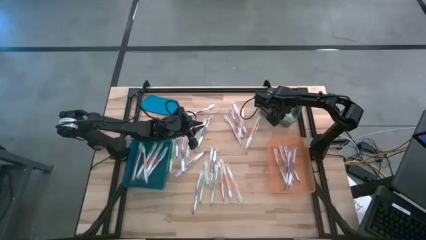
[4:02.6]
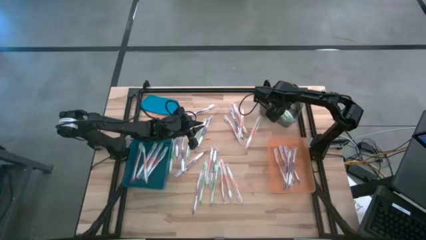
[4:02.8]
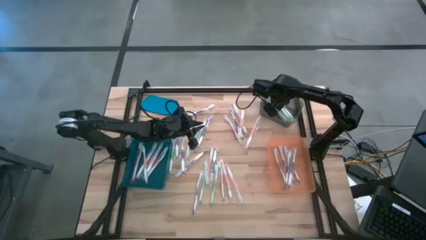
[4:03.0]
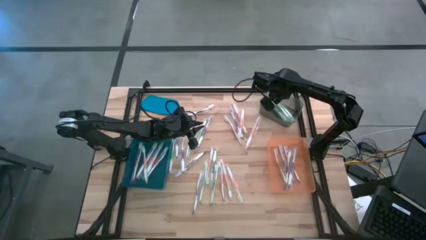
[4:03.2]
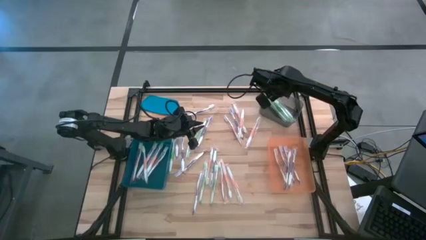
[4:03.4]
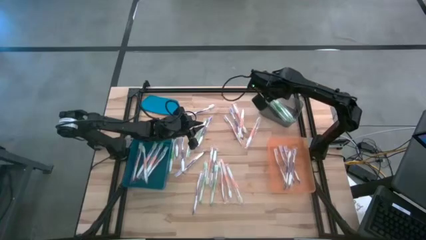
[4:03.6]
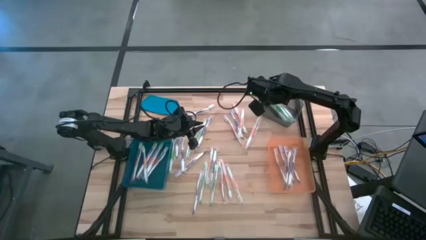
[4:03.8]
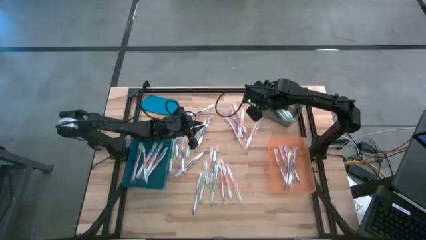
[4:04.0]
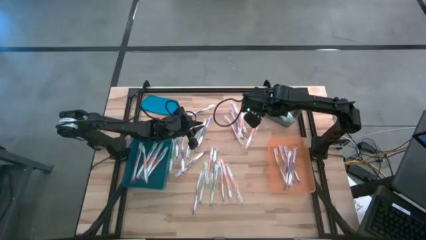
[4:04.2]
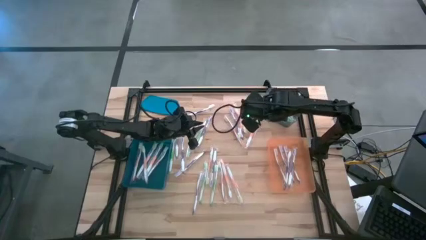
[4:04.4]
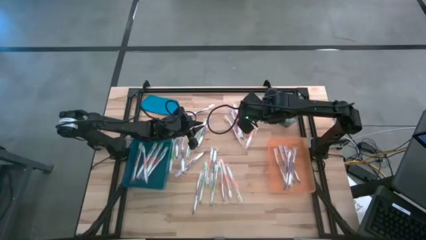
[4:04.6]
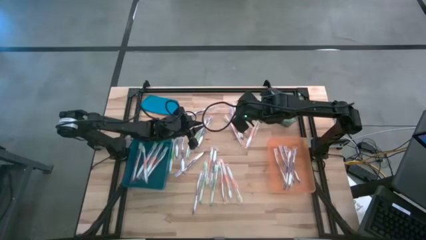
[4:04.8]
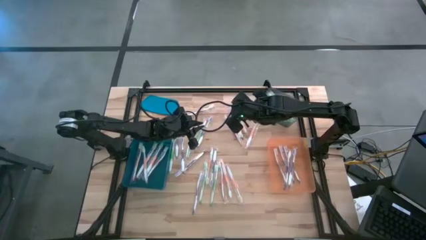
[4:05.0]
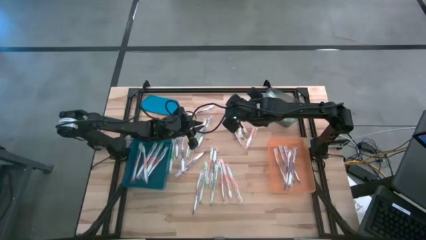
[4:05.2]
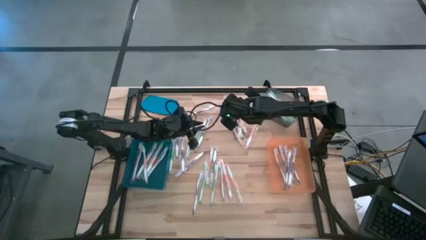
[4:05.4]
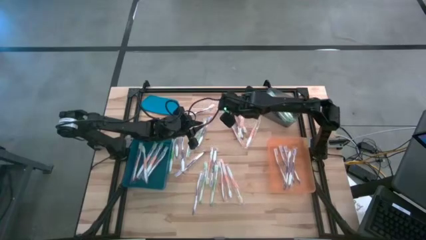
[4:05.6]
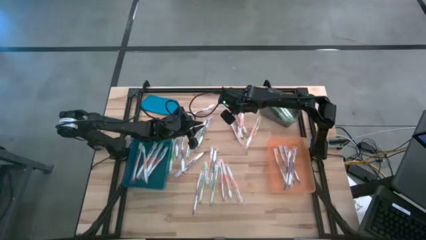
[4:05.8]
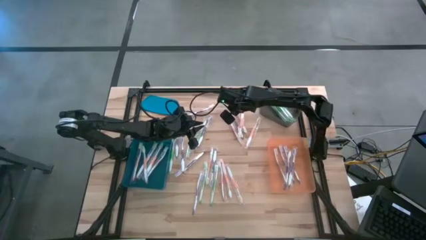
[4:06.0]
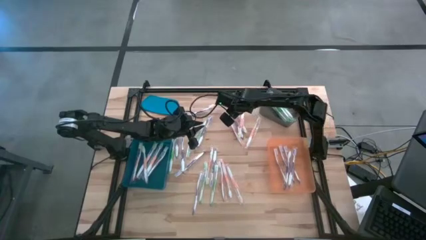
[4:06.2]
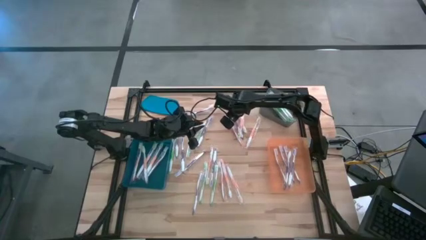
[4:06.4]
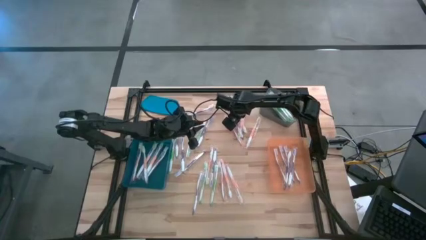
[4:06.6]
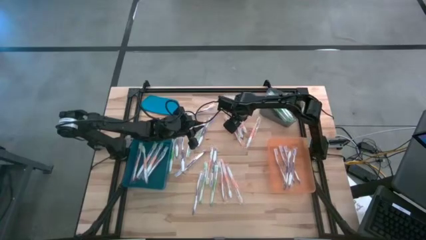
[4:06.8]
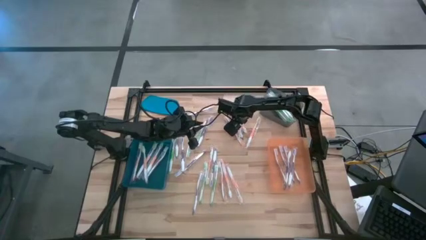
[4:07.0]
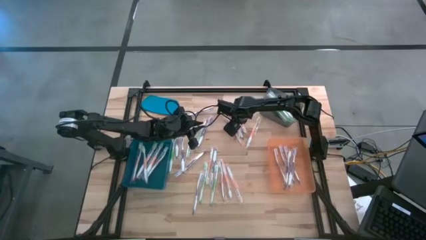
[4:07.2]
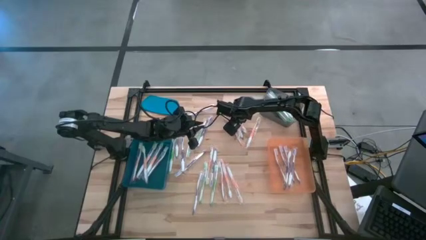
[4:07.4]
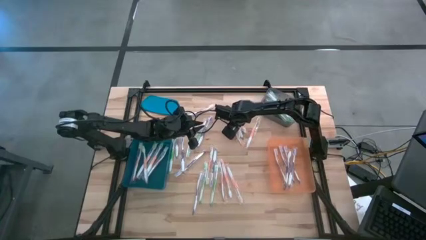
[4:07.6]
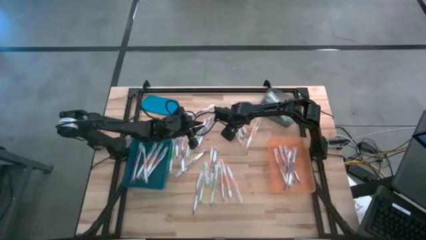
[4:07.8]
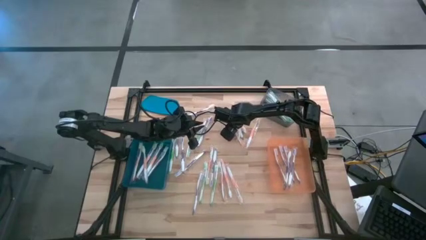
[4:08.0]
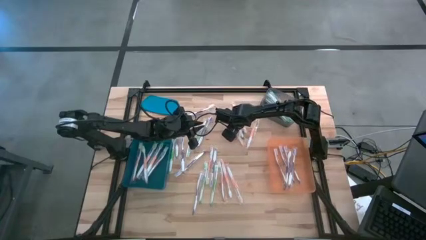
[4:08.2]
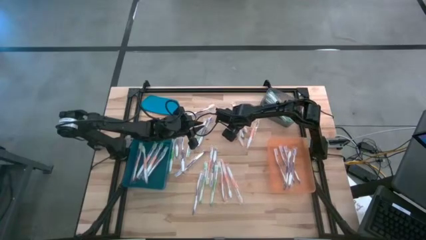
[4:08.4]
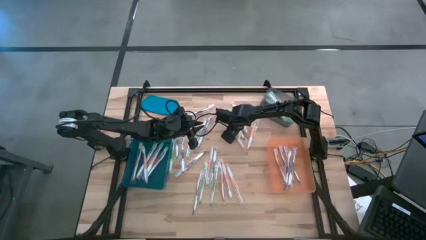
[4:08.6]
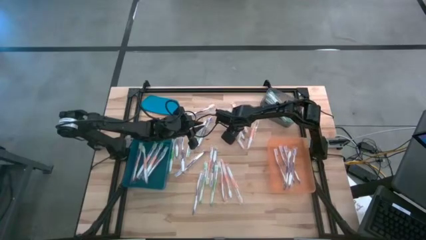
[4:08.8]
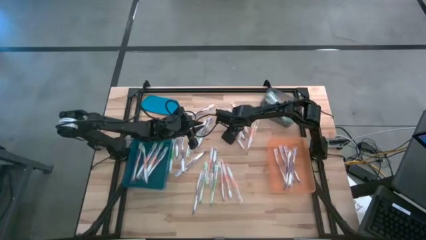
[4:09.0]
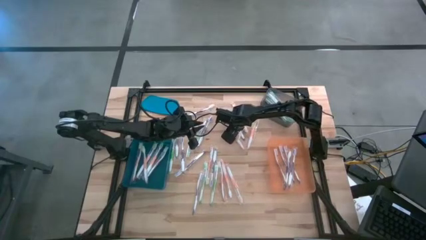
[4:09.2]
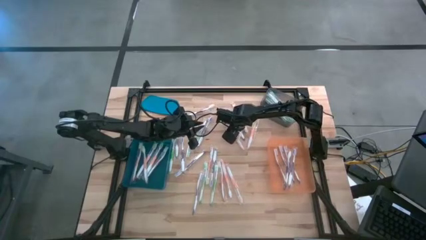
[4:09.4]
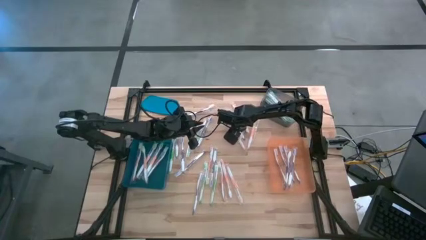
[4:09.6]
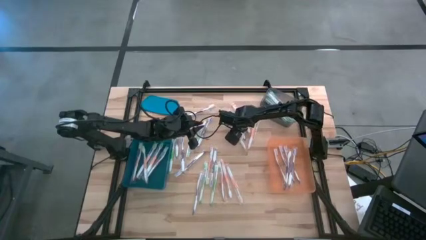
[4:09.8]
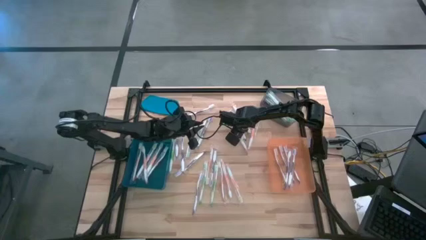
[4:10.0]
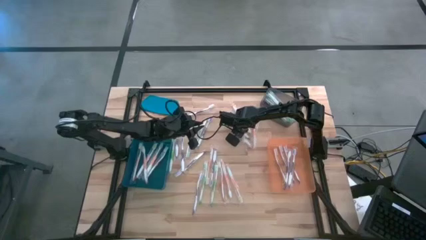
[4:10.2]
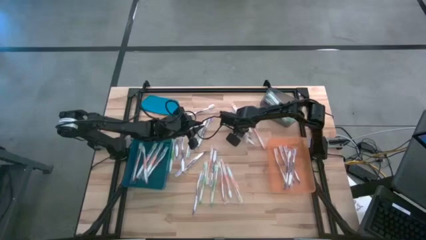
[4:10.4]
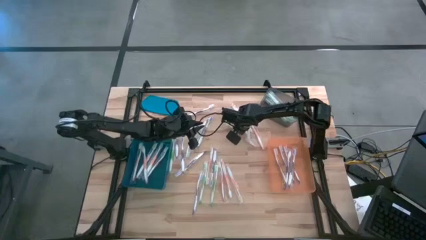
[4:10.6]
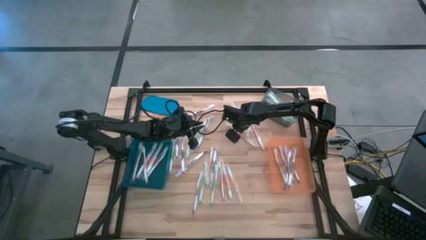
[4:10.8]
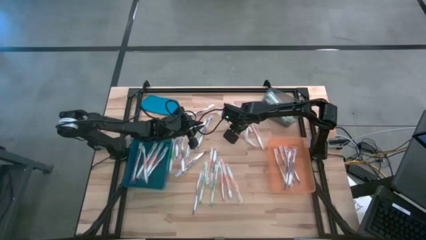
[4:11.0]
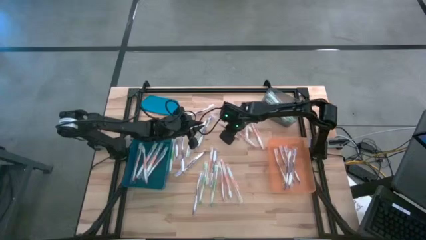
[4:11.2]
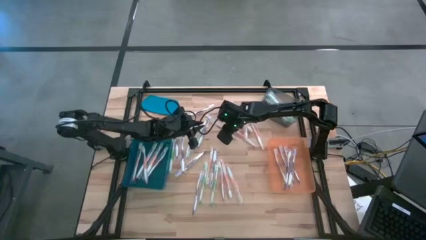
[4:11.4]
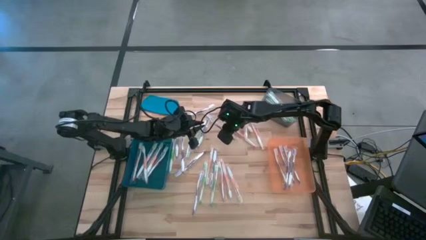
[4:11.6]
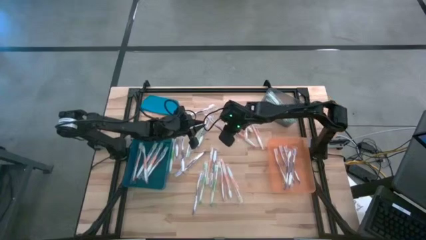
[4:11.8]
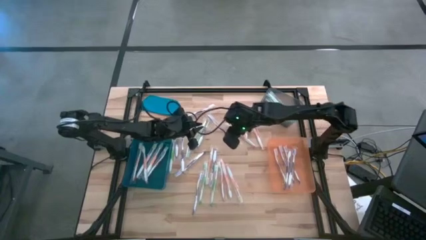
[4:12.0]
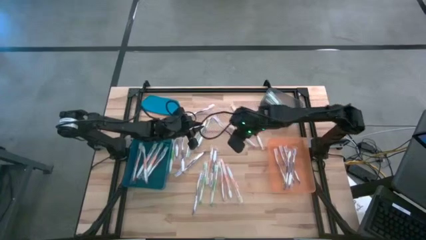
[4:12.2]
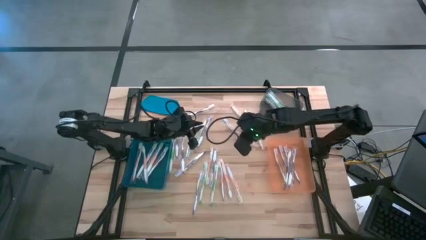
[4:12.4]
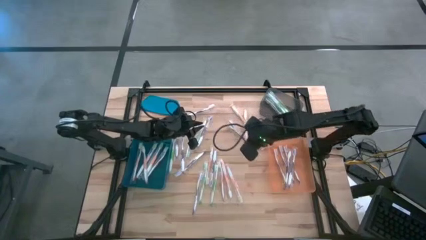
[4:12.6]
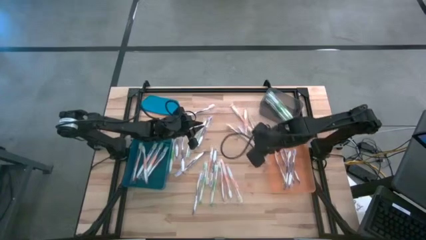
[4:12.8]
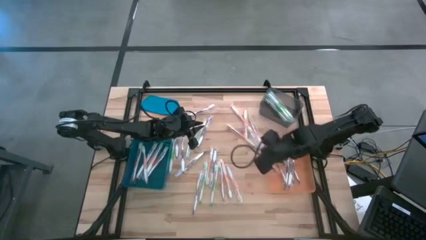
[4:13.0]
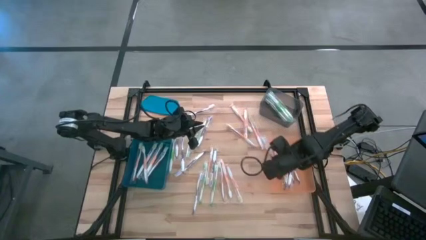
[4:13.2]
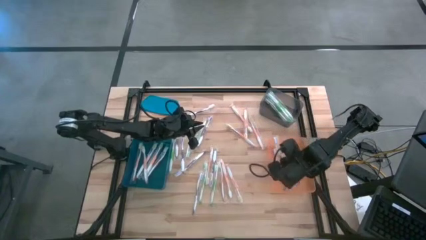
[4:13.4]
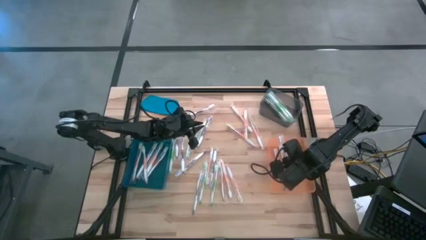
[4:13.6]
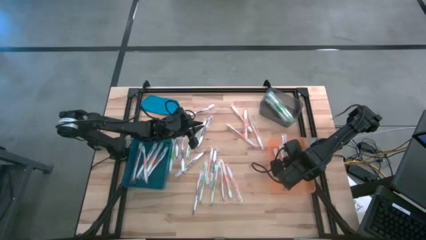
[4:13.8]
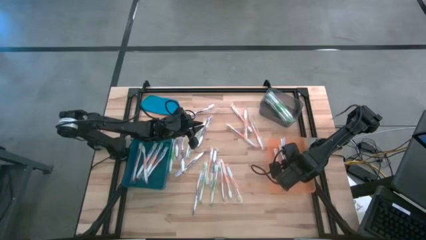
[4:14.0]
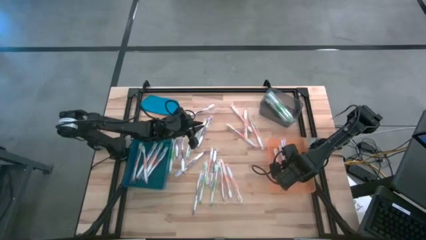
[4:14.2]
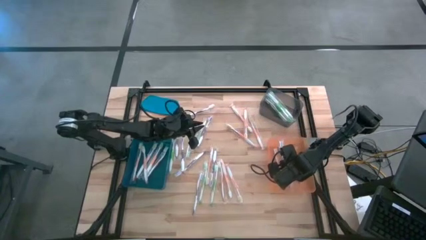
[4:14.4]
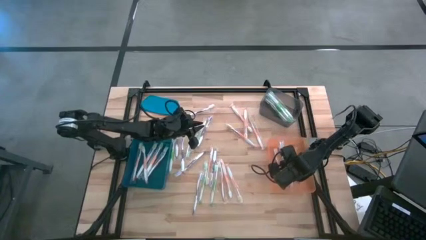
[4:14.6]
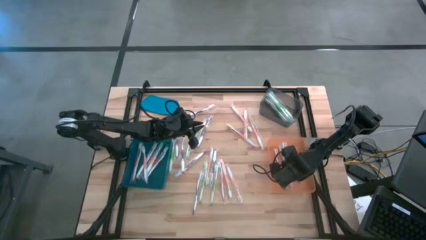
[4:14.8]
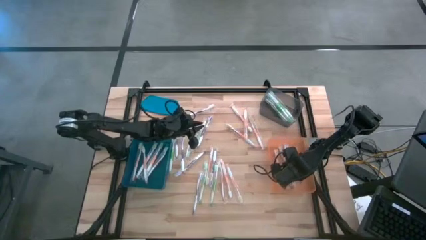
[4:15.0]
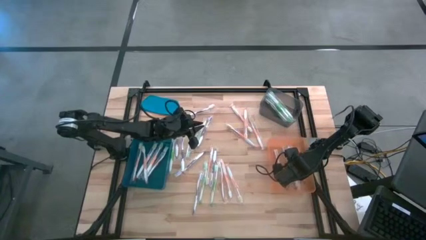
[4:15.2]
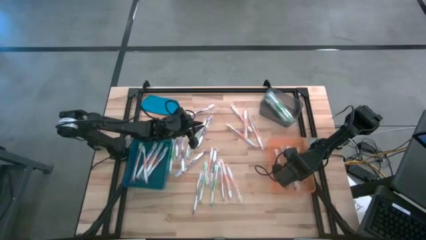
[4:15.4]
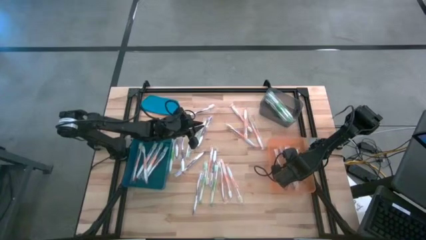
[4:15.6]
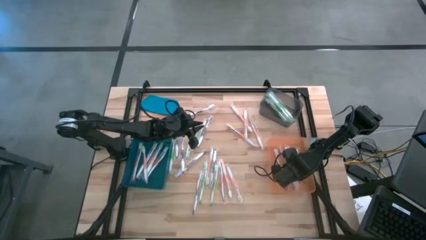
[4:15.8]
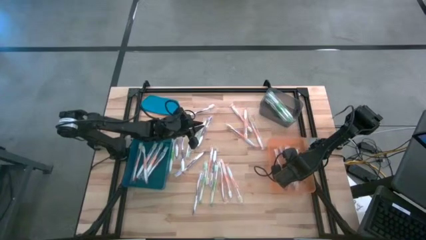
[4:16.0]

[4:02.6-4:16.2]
Task: Pick & Place Toothbrushes
Put the purple toothbrush into the orange bin
